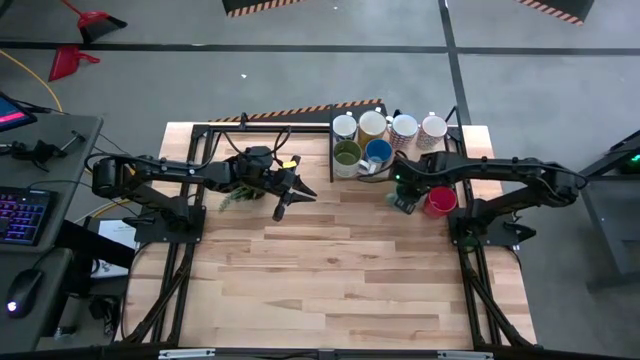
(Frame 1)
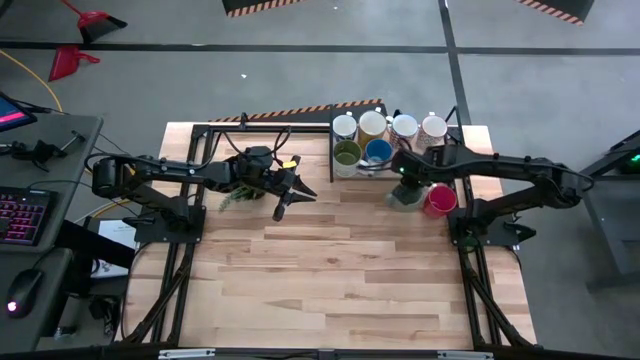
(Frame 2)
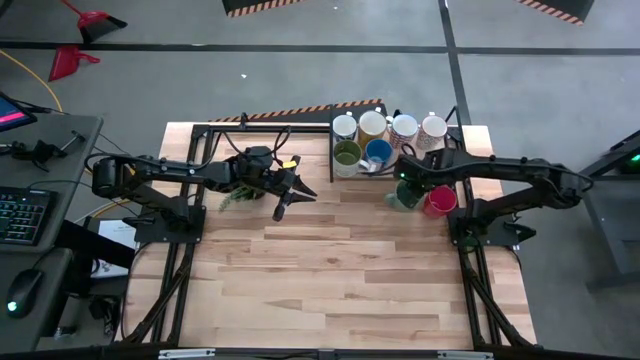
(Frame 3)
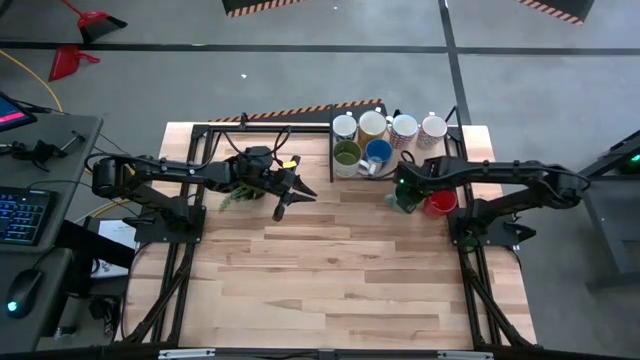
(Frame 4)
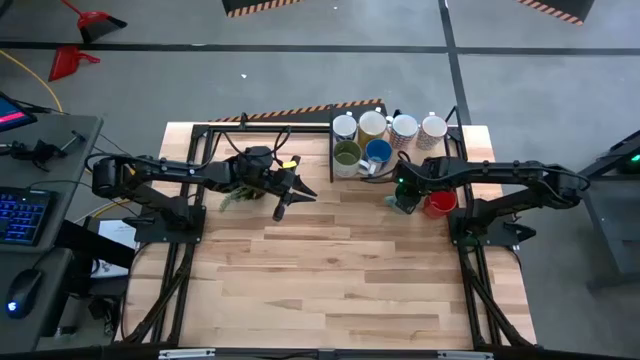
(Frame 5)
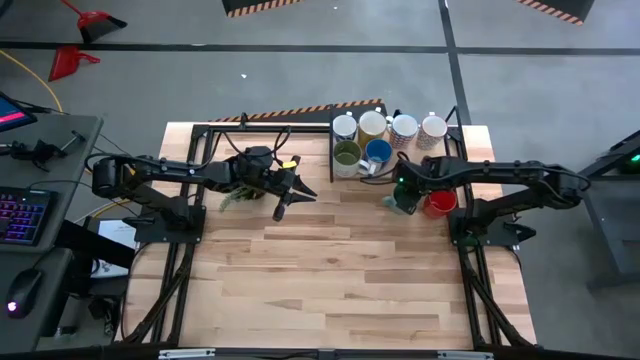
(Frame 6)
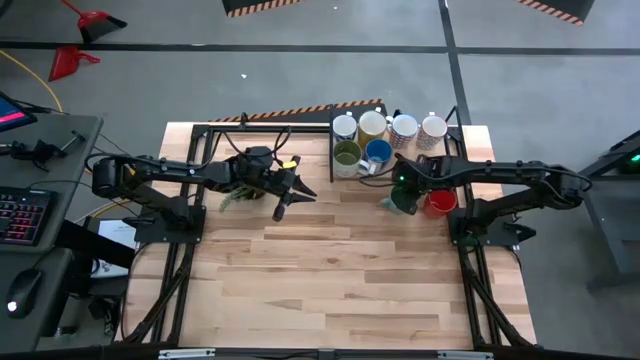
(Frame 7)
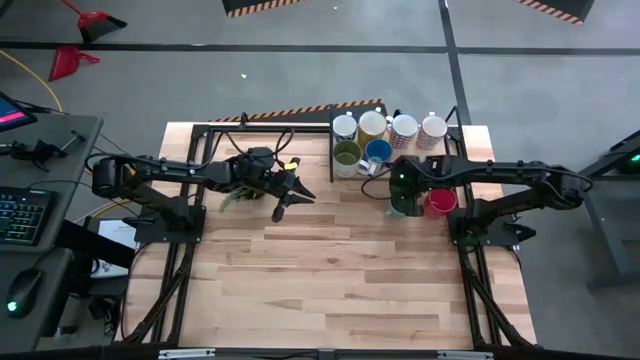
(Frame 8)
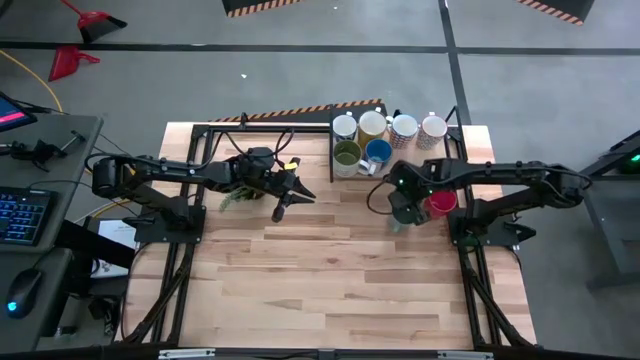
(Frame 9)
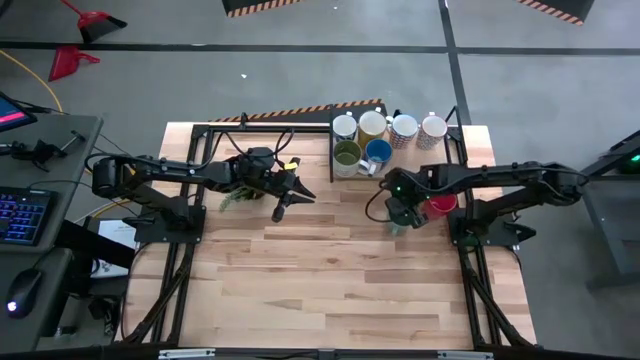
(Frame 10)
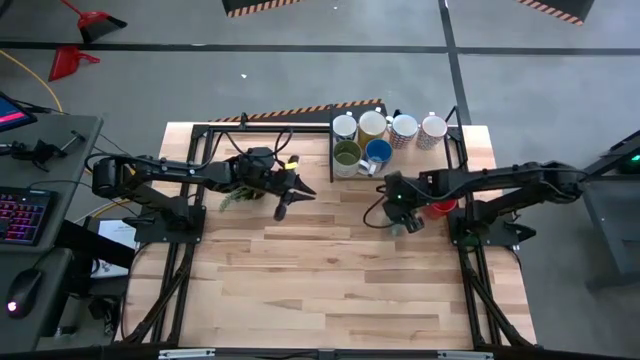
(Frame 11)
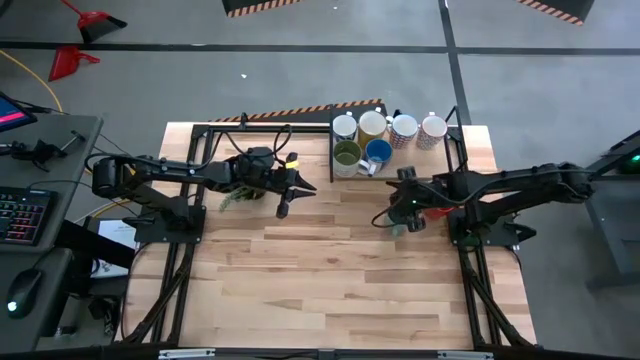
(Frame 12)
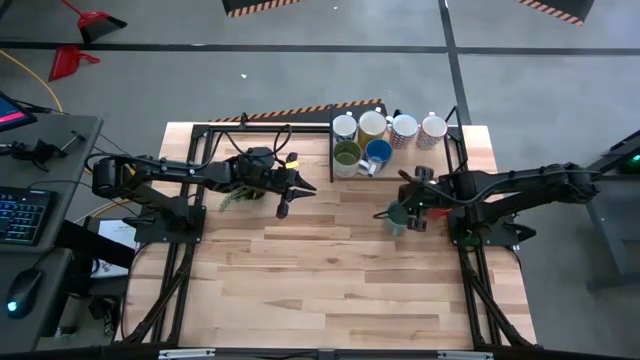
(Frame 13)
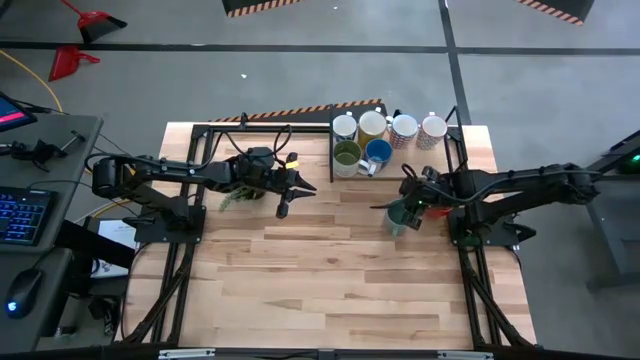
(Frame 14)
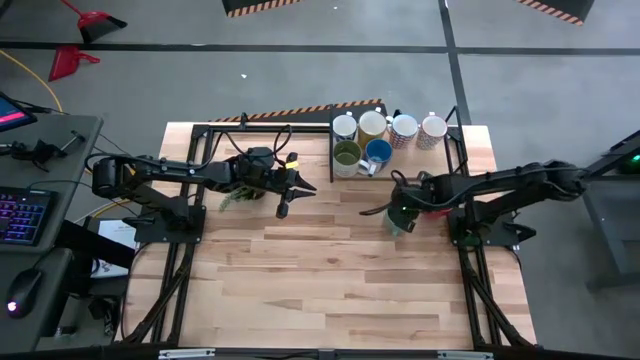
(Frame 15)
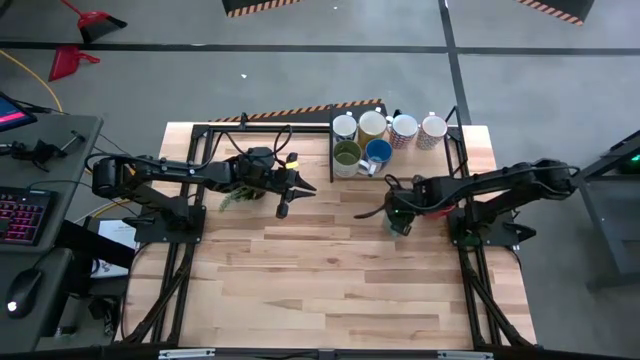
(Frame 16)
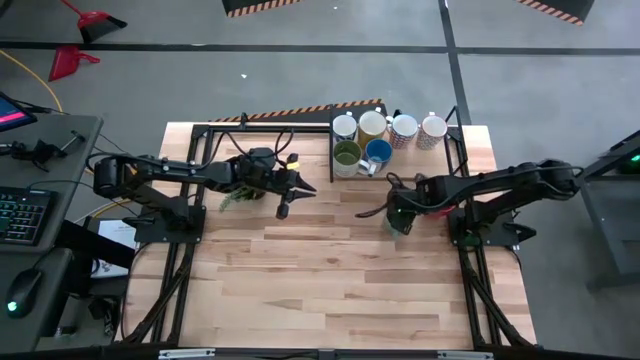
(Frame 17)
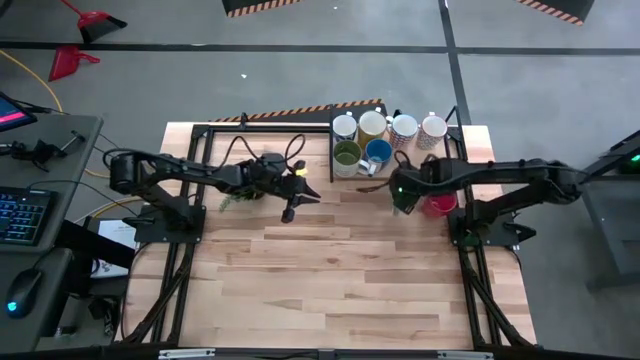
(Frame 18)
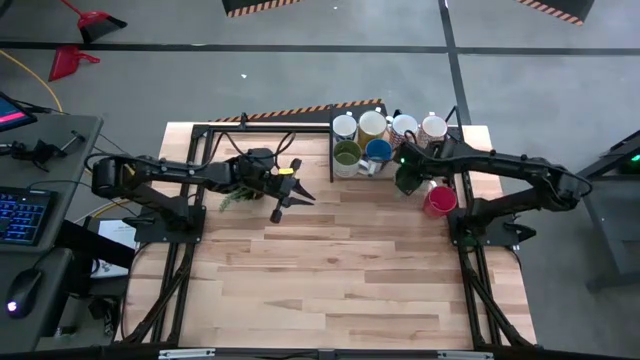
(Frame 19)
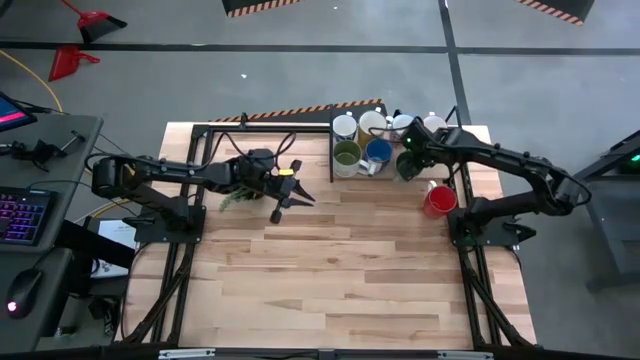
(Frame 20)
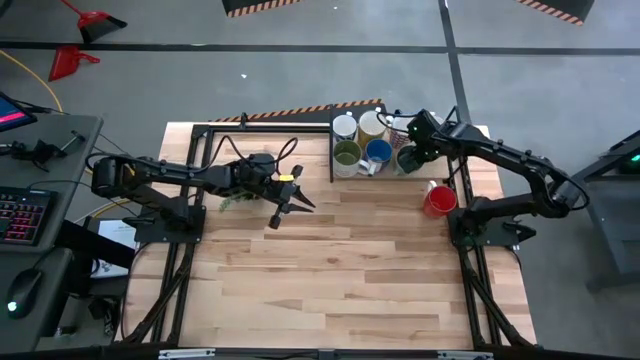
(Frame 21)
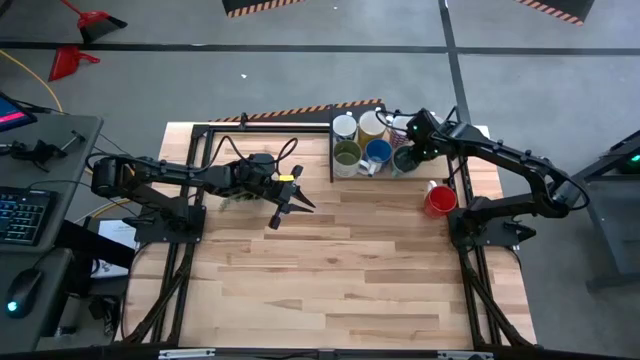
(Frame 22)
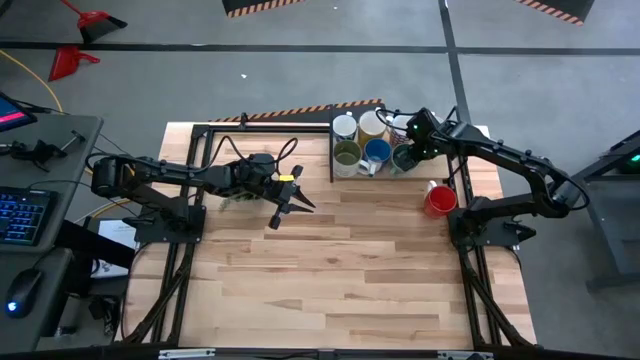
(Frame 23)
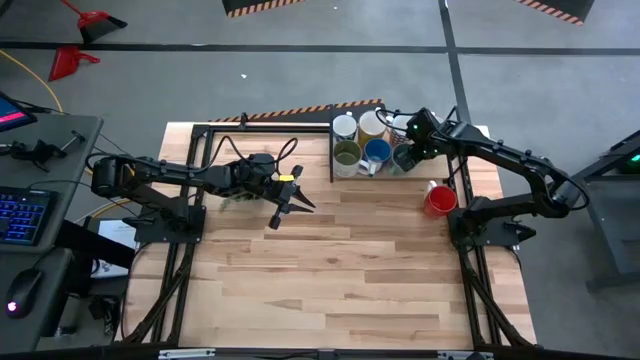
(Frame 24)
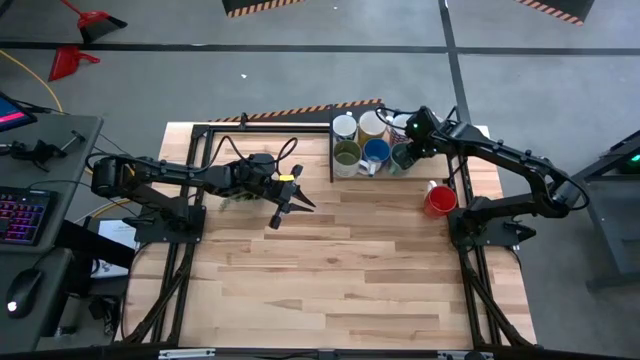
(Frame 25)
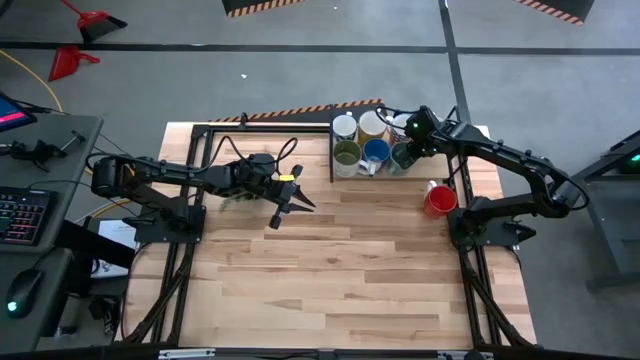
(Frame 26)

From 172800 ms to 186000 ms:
Task: Place coffee mugs
Put the green mug on the shelf

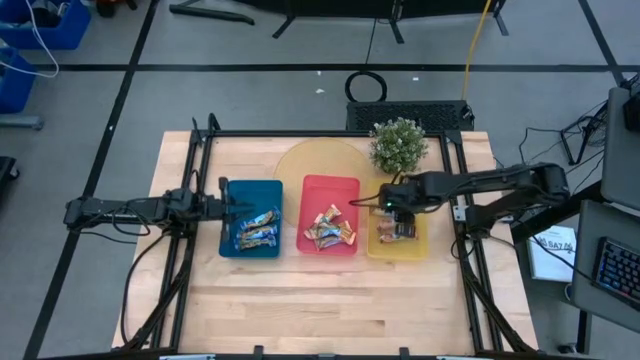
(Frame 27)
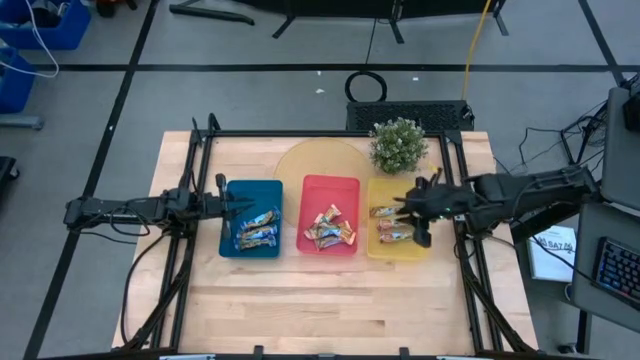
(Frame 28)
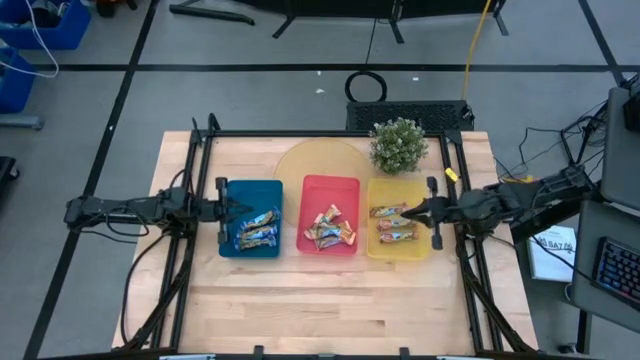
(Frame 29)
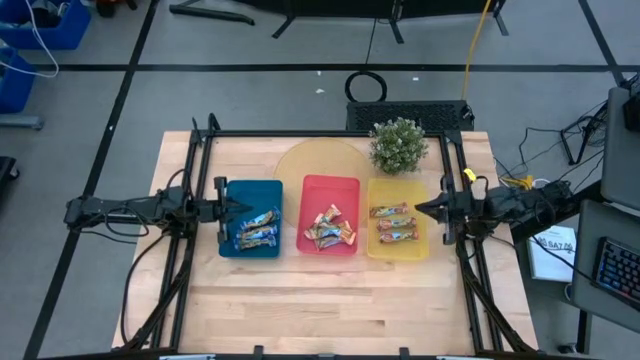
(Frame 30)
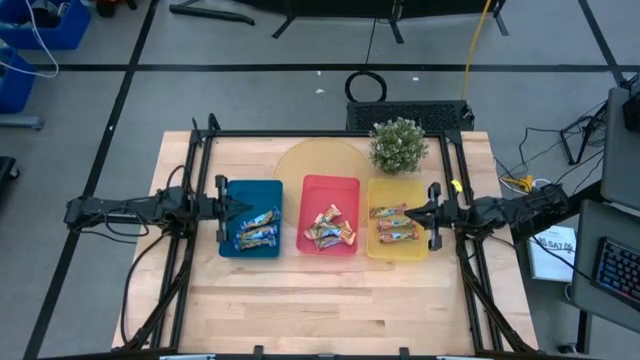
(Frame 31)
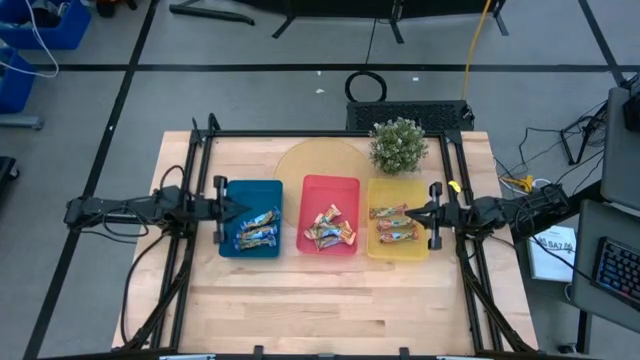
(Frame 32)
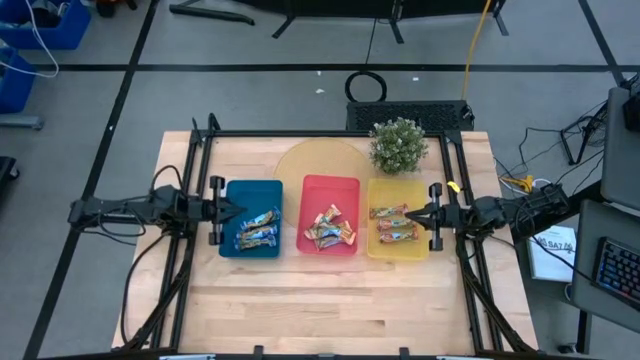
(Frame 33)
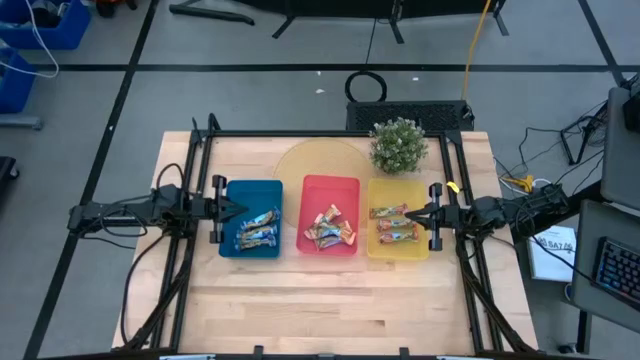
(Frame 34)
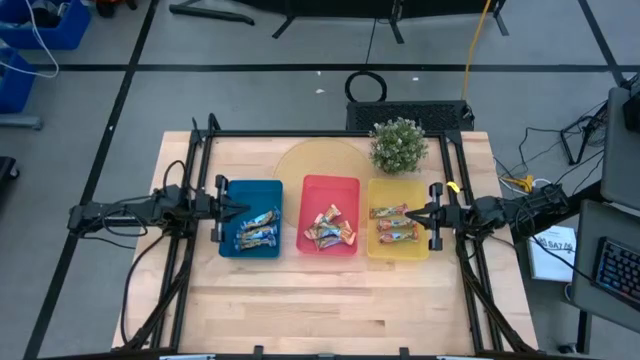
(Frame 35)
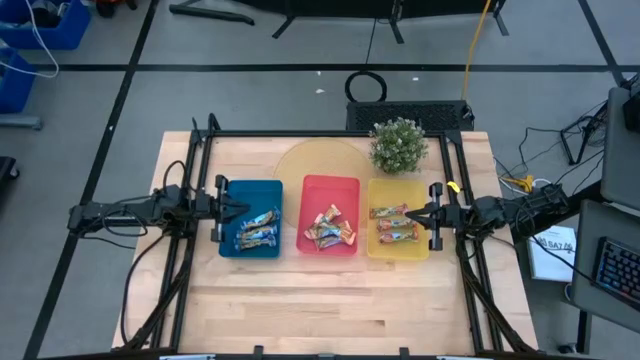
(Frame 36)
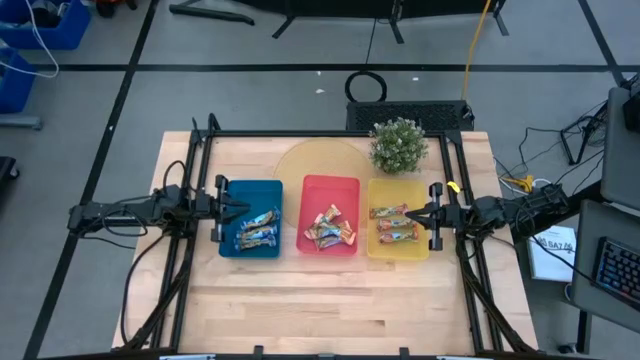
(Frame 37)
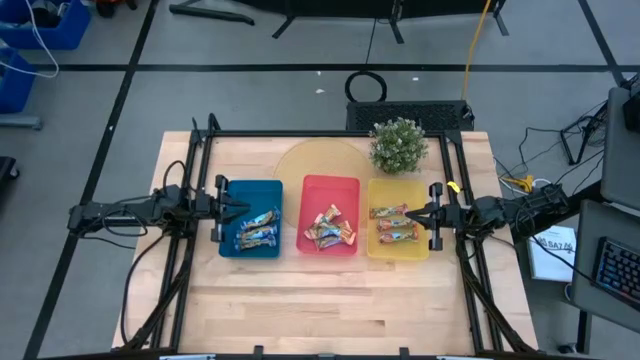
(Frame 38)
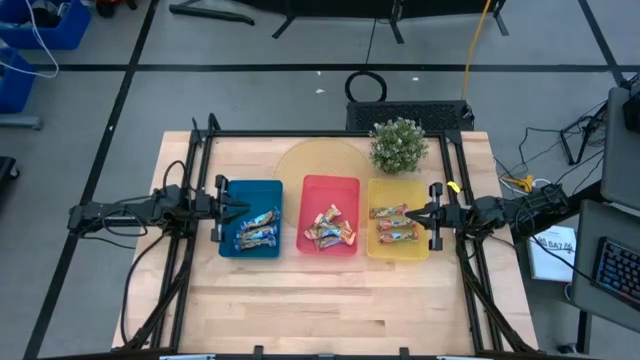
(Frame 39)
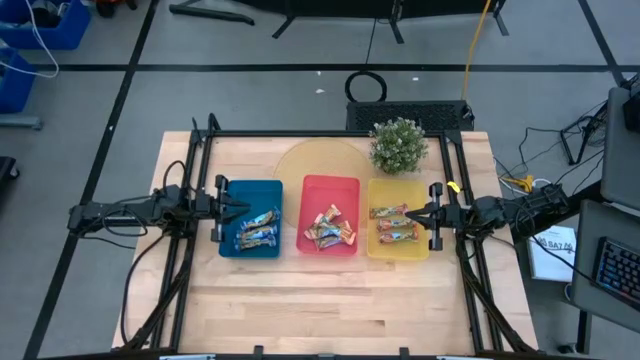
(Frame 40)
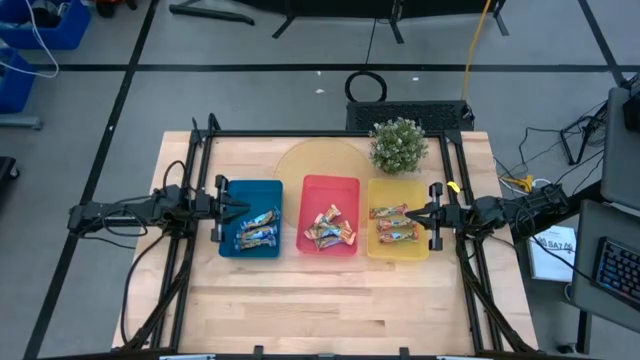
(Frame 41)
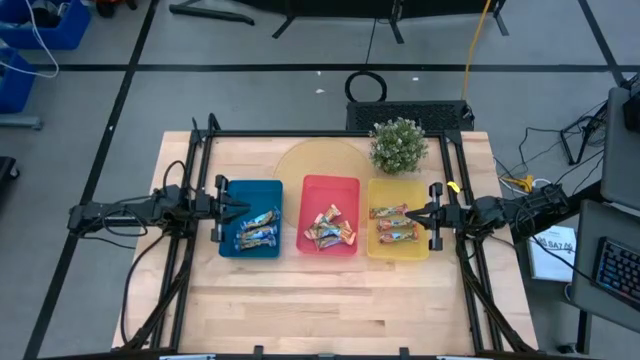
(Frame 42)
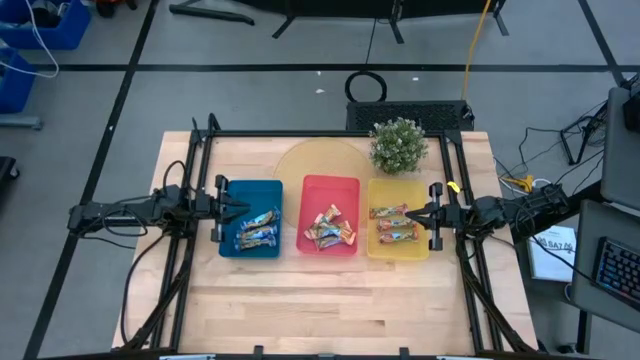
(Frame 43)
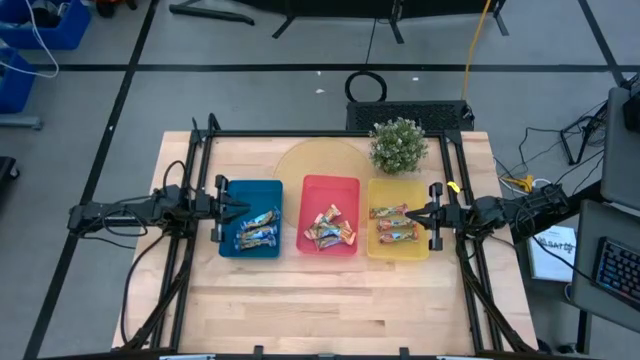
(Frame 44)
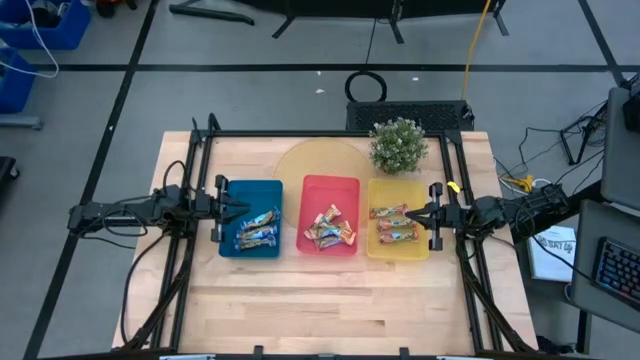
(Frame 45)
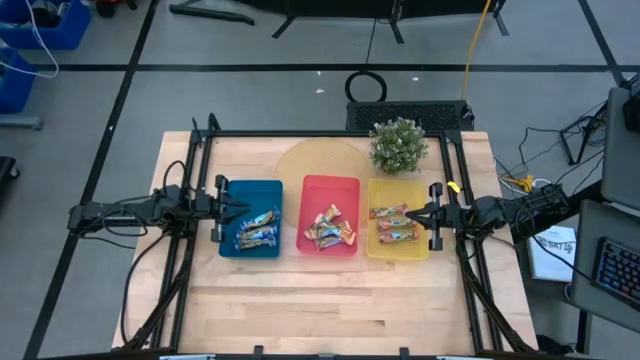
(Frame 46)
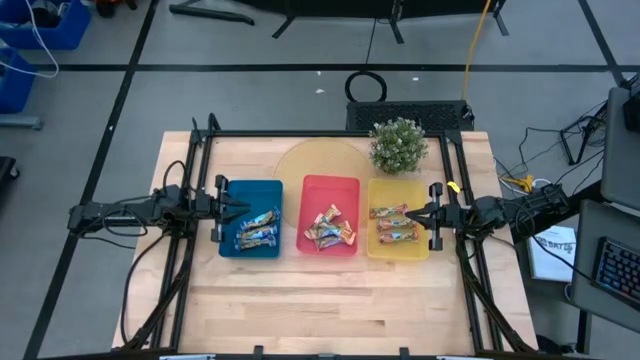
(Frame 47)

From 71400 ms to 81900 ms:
Task: Pick and place Granola Bars by type
Return to Home Position
